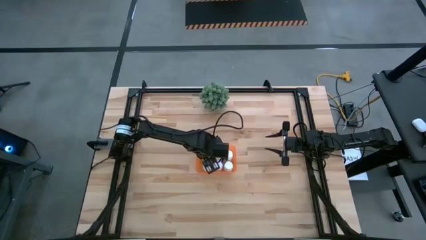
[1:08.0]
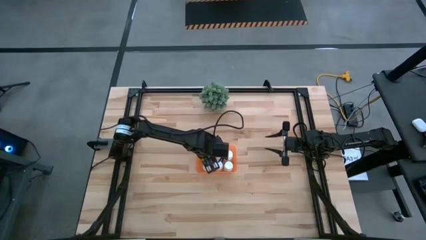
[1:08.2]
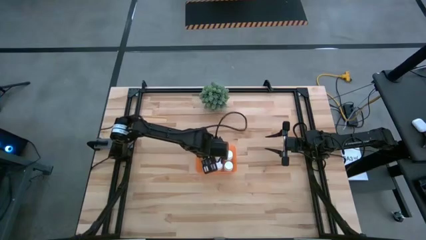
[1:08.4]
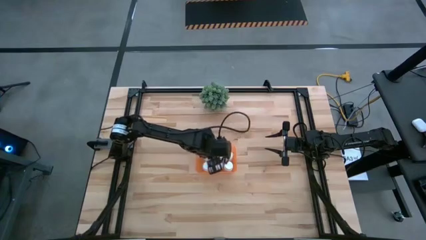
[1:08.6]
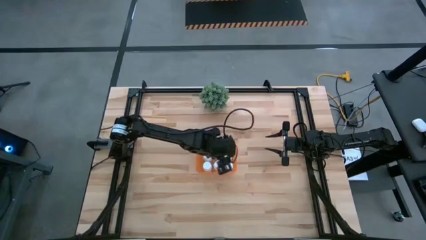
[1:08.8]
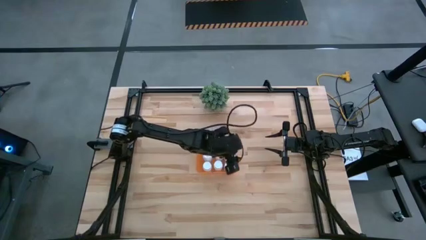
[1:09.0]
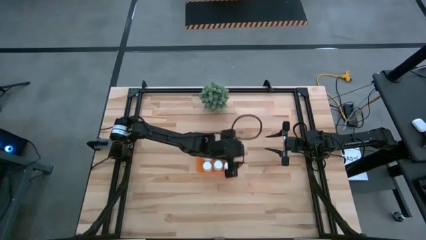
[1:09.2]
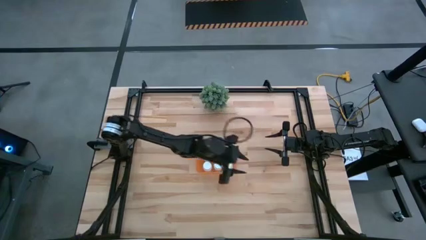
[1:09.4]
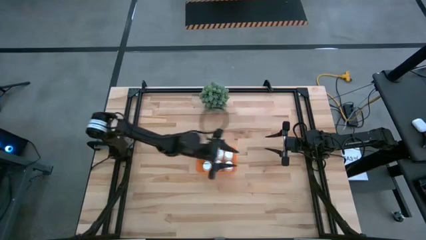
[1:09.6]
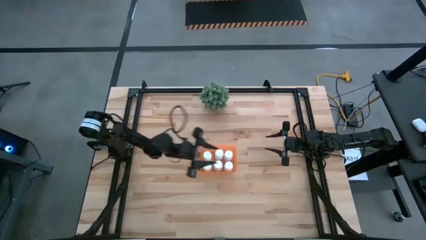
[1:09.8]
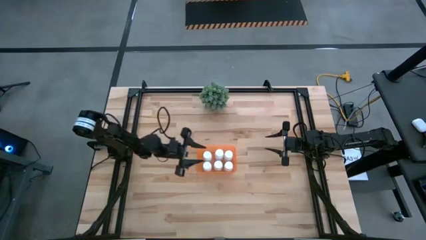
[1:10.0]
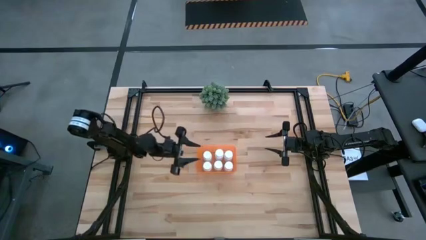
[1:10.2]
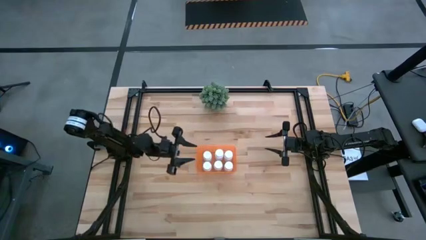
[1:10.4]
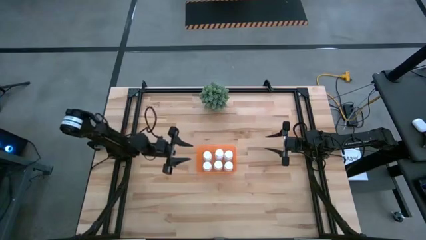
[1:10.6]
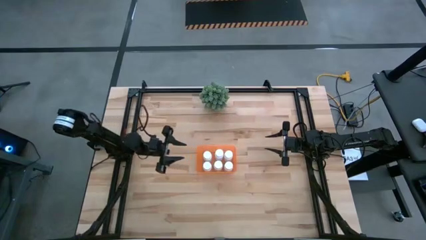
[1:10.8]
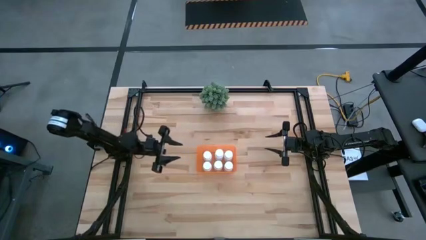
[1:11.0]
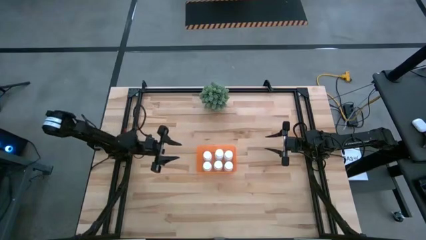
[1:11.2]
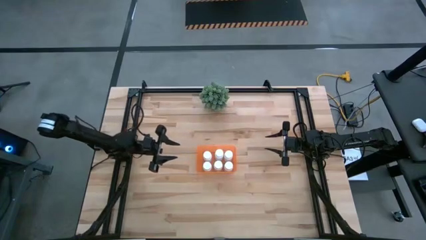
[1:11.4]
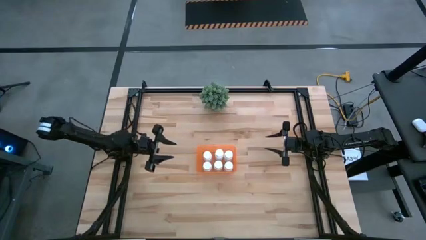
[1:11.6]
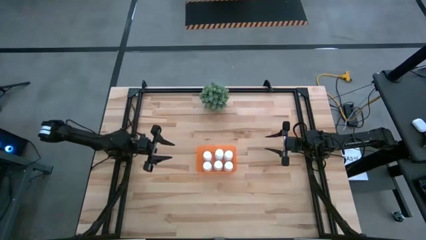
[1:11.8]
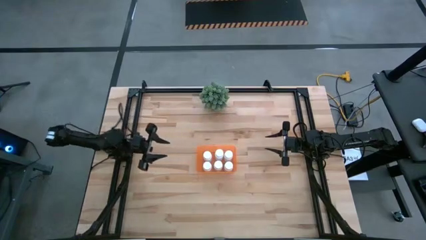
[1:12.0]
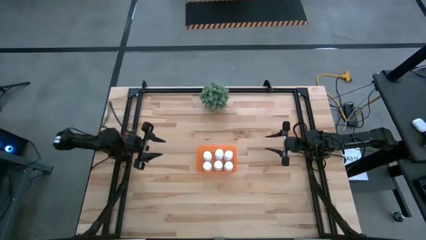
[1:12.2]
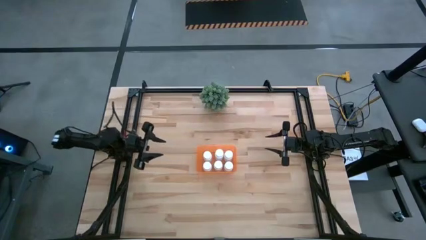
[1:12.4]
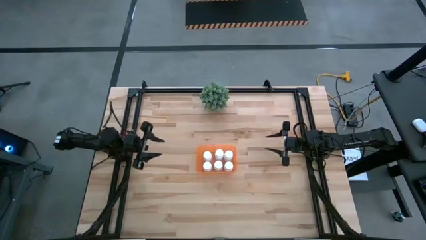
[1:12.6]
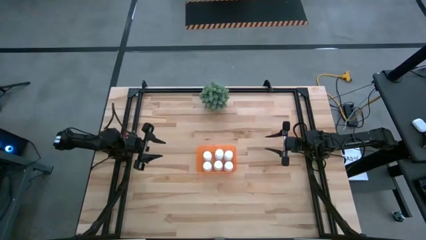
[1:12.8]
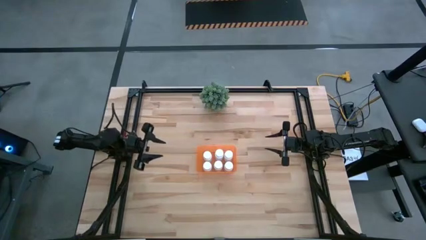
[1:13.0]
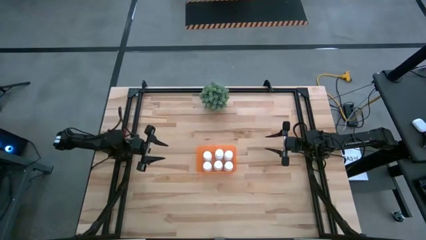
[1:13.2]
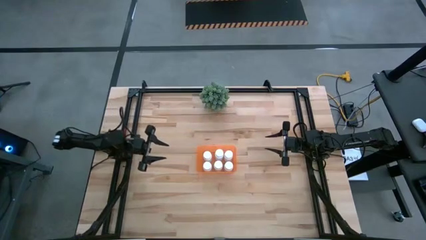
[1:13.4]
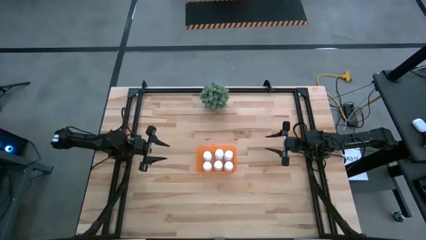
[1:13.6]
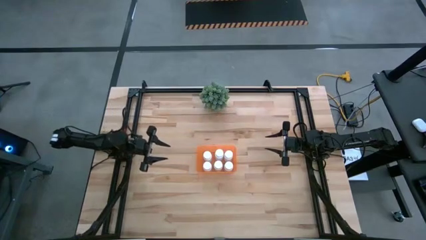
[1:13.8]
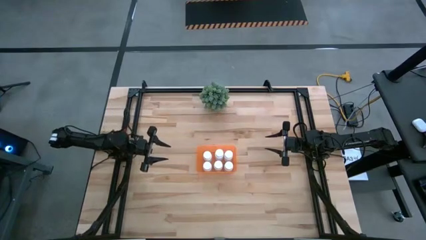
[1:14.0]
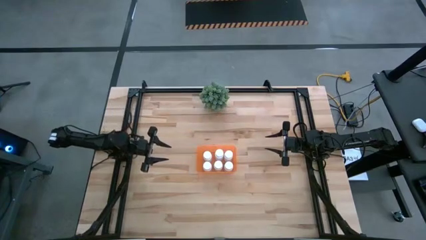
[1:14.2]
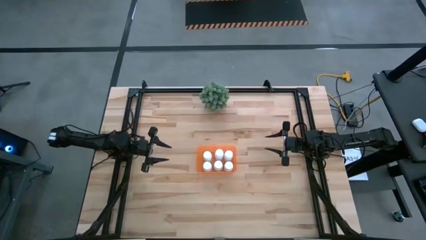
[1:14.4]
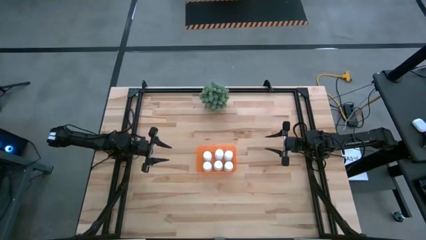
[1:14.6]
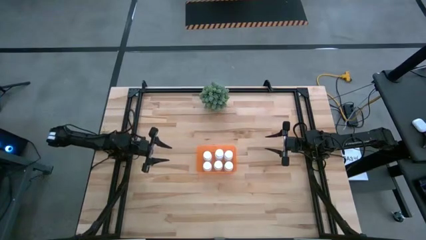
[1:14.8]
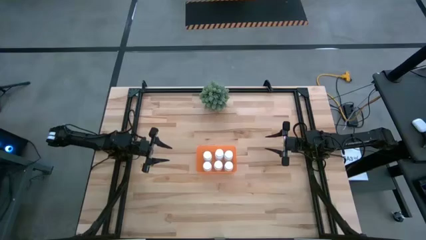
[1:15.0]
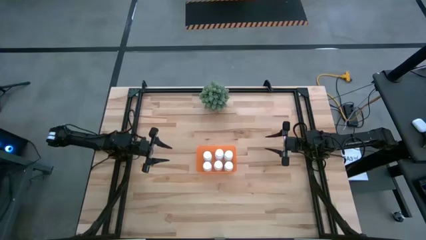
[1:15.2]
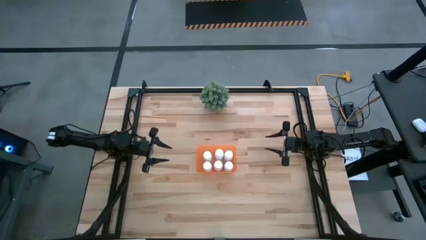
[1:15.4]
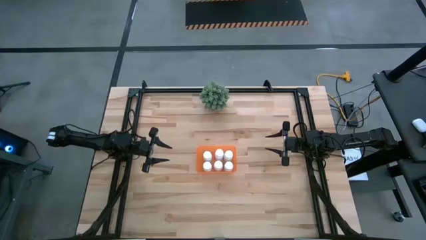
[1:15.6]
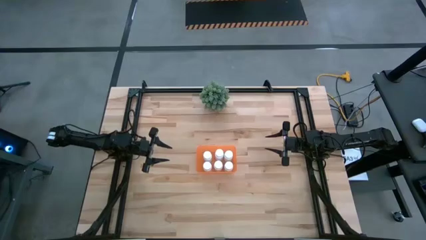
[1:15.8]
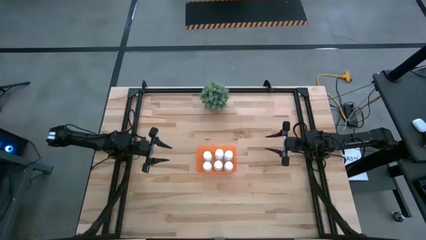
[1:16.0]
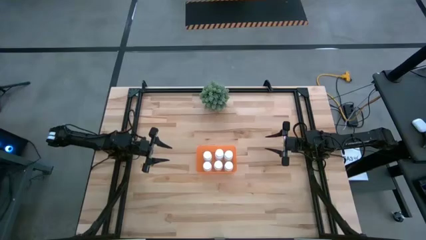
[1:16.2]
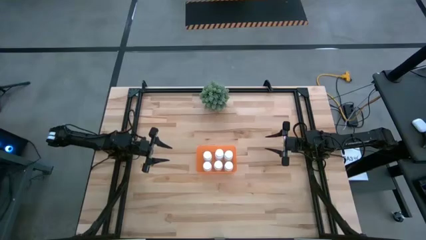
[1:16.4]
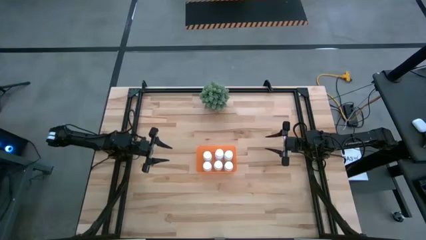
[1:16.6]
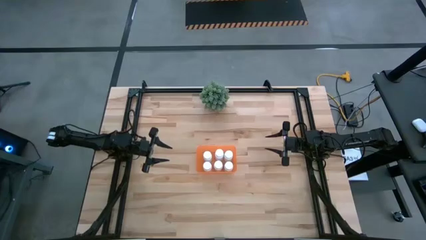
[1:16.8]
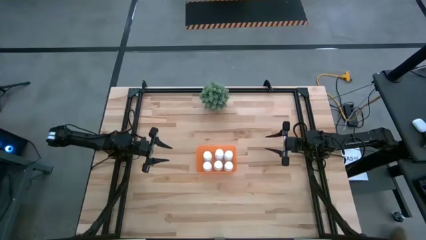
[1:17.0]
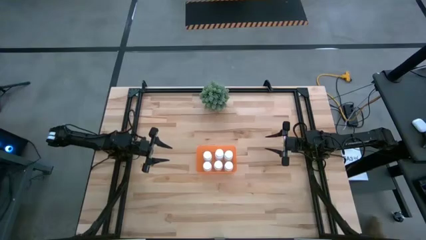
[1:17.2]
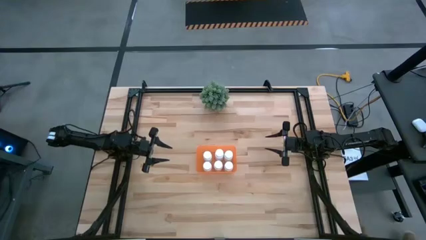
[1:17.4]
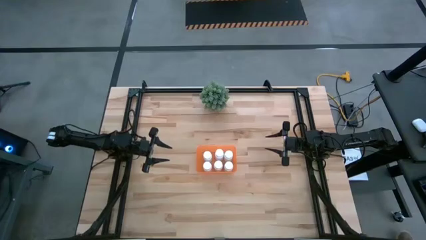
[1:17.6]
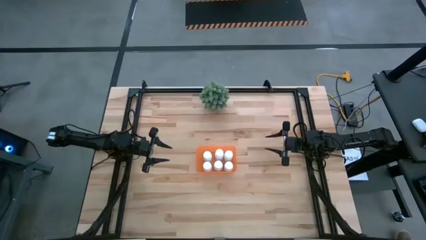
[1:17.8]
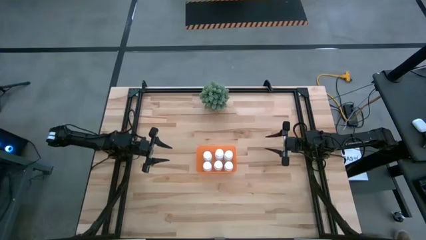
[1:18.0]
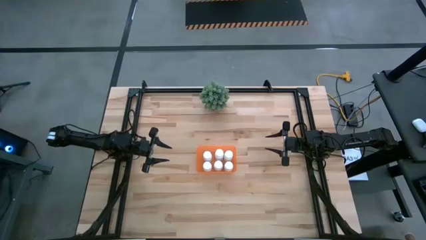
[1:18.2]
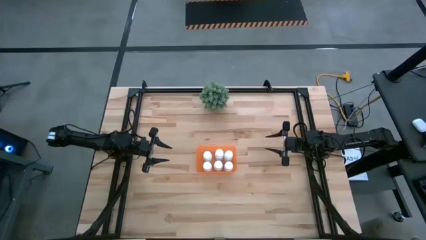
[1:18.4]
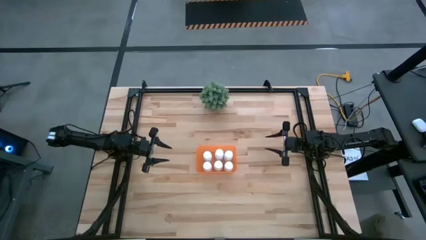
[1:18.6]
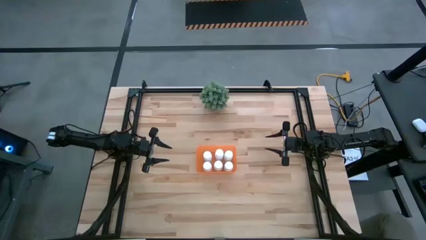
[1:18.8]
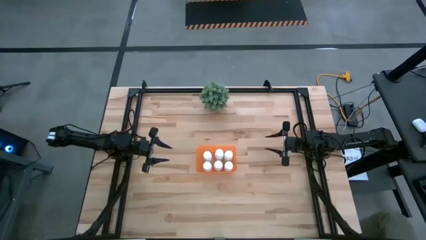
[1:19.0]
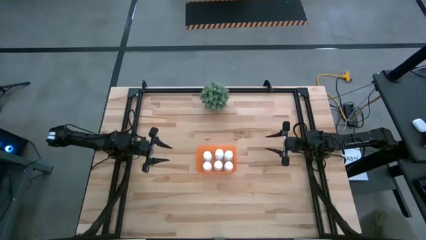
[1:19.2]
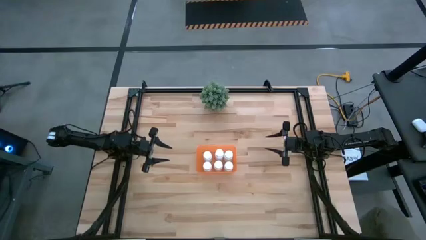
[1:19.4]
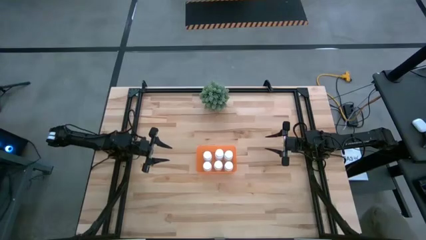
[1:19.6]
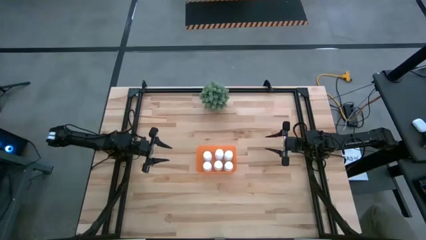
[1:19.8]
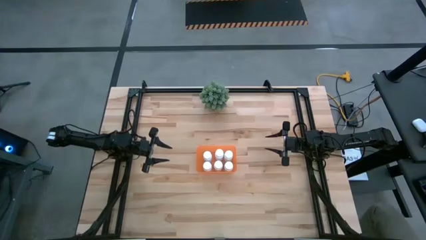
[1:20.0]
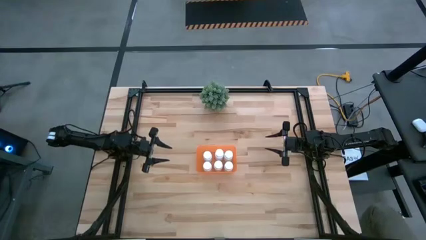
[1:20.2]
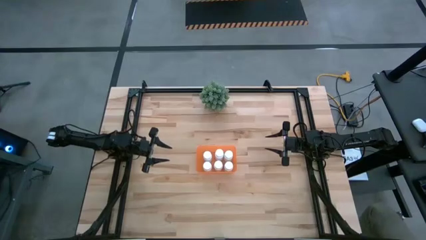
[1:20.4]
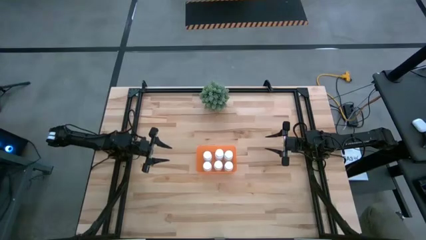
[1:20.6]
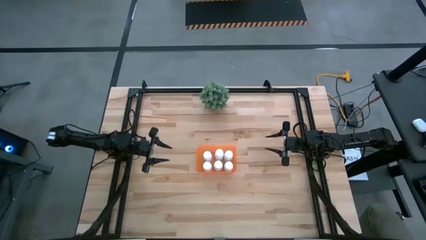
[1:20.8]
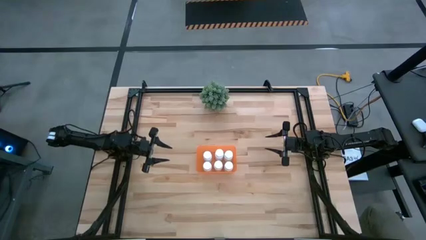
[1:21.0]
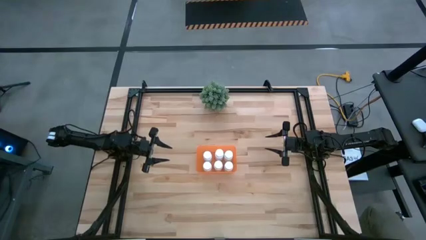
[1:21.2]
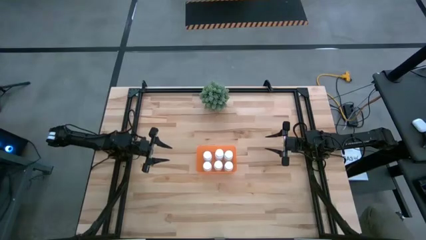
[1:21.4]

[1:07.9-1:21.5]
Task: Pick and place pill bottles into a basket
Return to Home Position

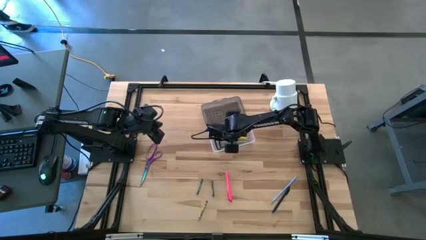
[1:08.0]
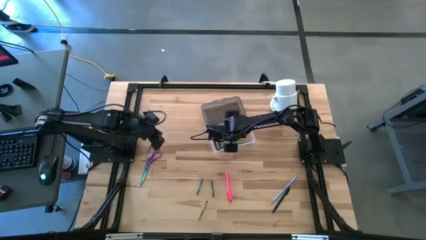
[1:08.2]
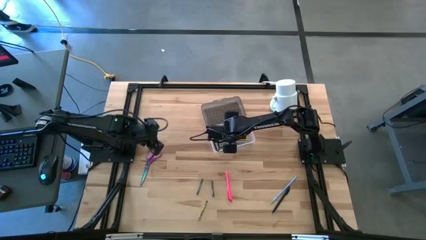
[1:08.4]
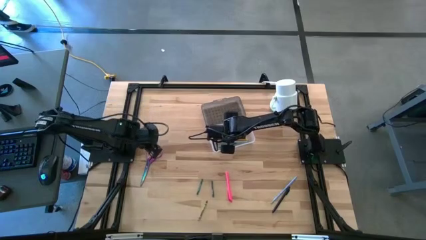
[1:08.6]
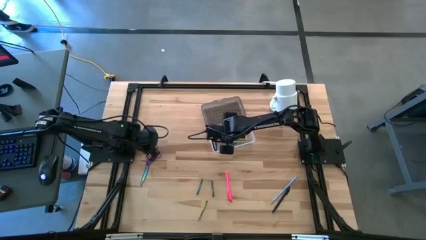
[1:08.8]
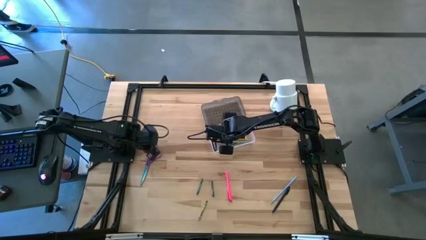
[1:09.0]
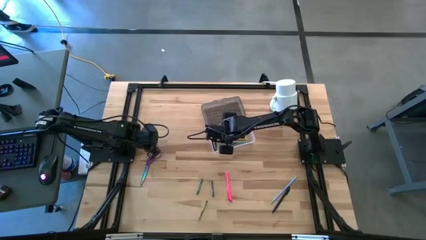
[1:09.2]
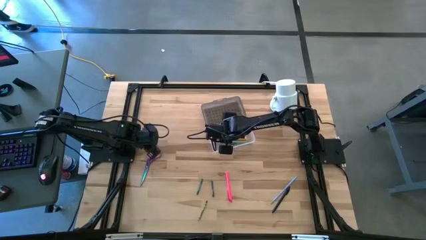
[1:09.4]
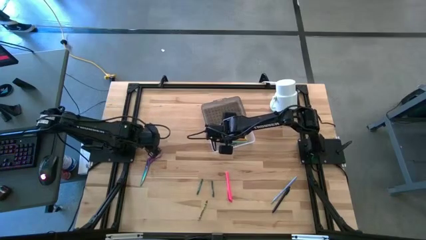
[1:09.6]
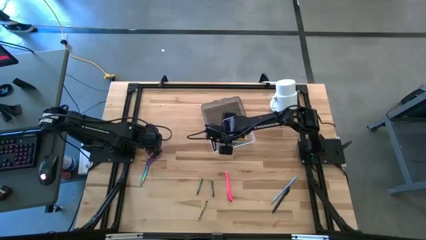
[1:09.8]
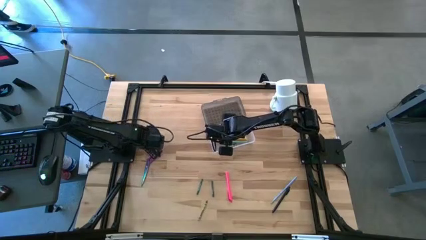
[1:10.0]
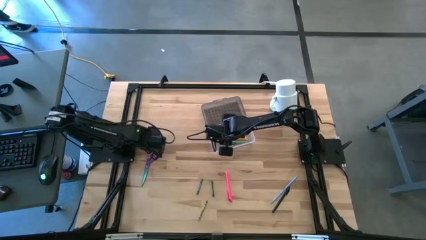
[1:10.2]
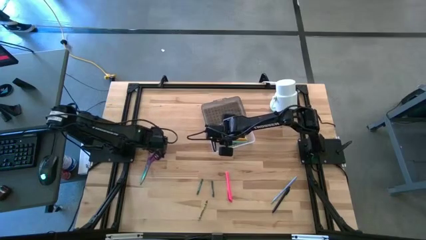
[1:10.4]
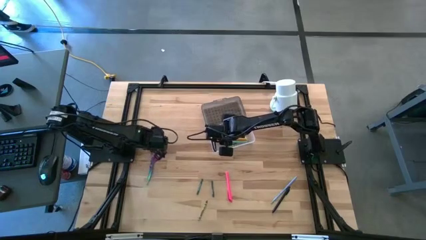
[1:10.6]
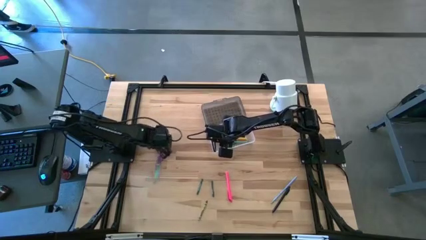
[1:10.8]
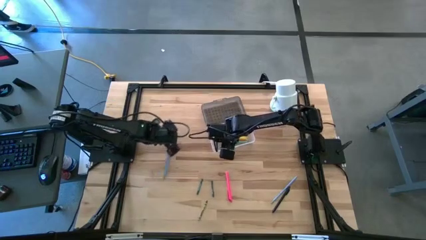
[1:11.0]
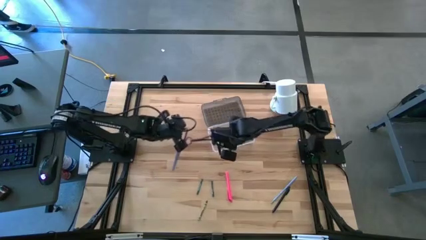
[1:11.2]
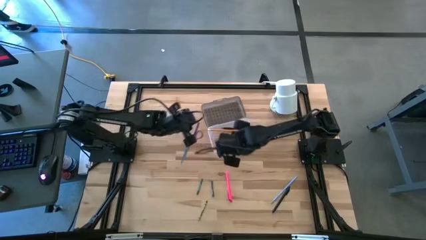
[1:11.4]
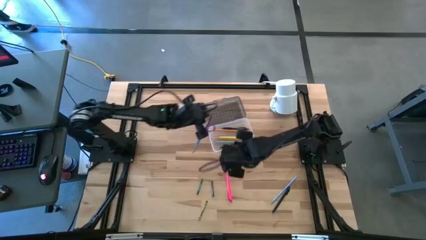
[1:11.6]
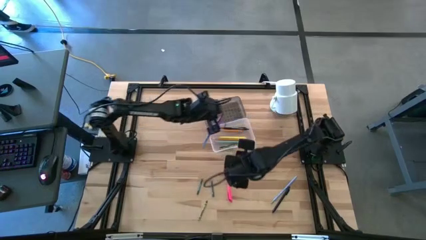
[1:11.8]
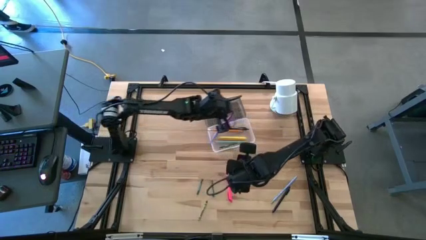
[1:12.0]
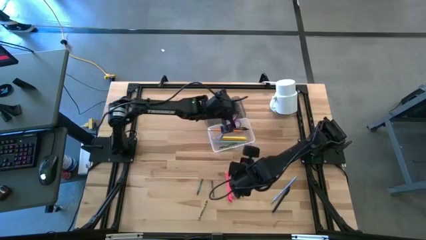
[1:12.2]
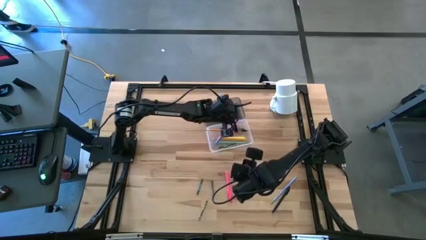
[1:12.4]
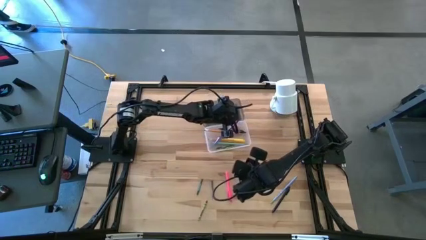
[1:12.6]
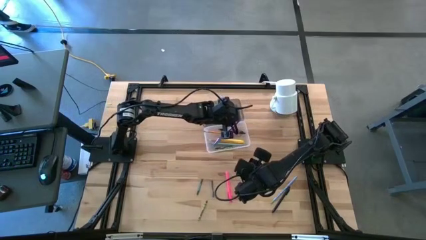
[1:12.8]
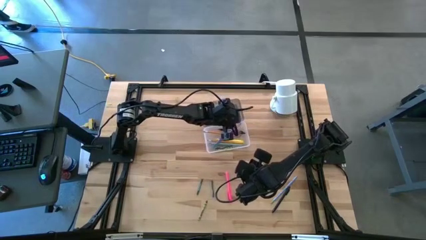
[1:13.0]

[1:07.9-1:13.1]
Task: Pick & place school supplies into a supply box
Put the scissor into the gray supply box
